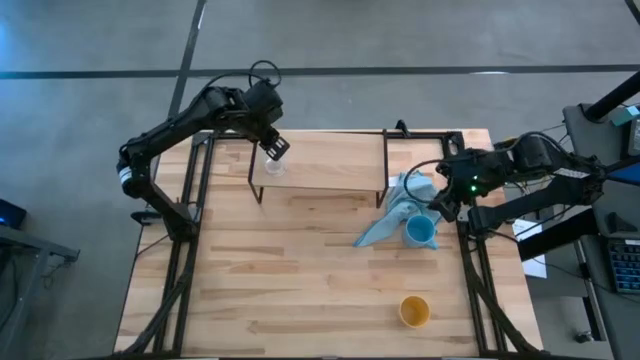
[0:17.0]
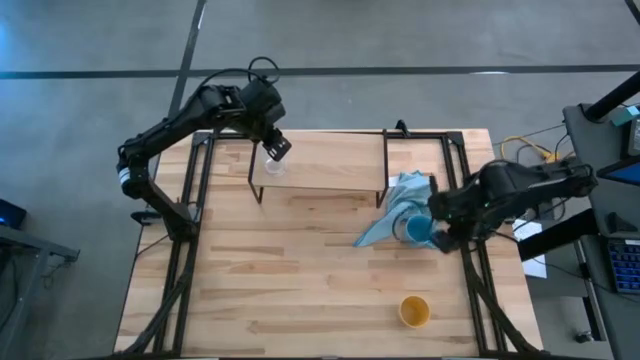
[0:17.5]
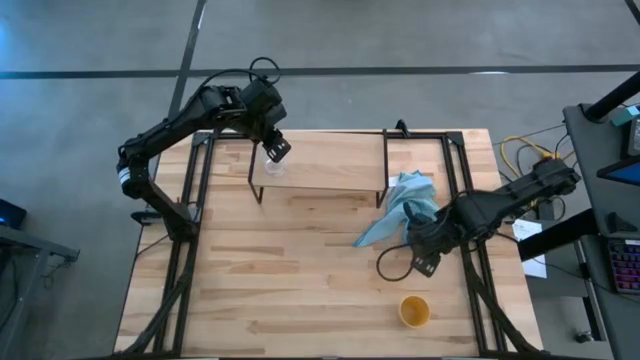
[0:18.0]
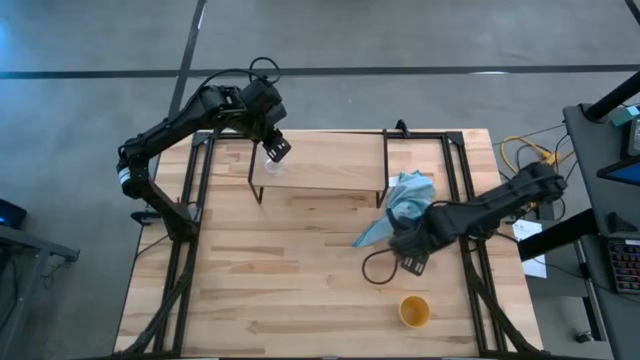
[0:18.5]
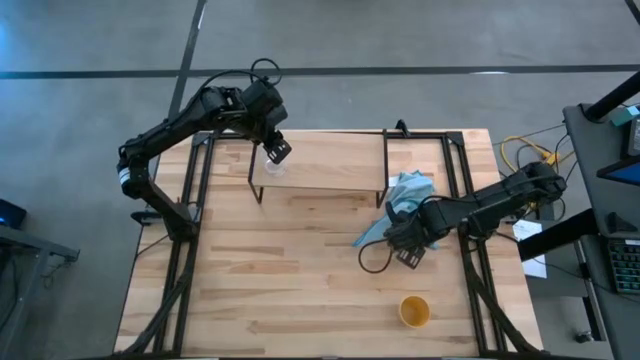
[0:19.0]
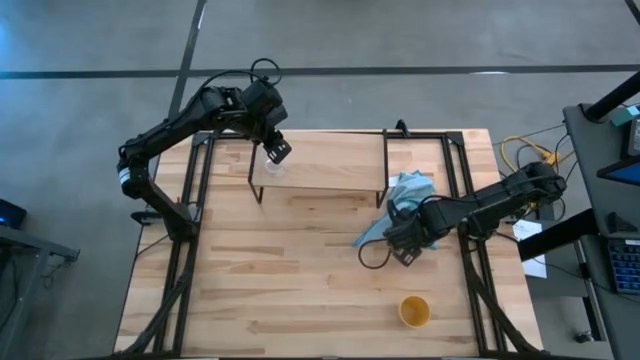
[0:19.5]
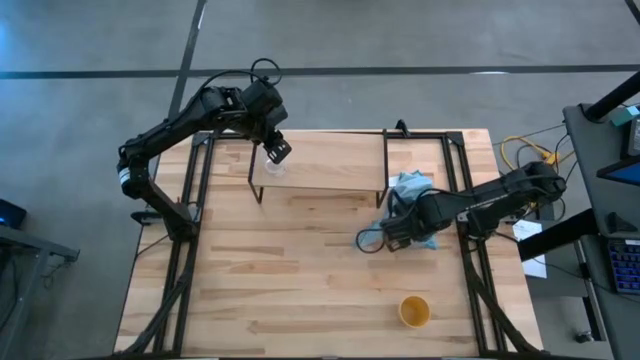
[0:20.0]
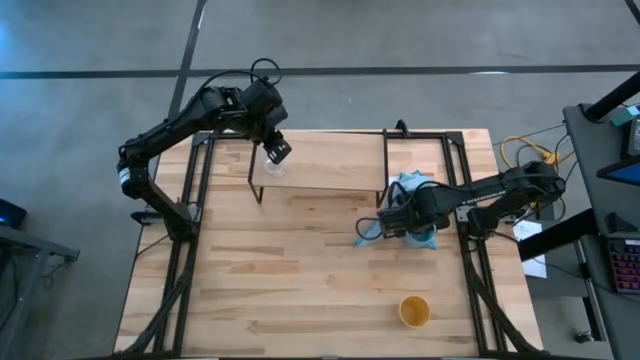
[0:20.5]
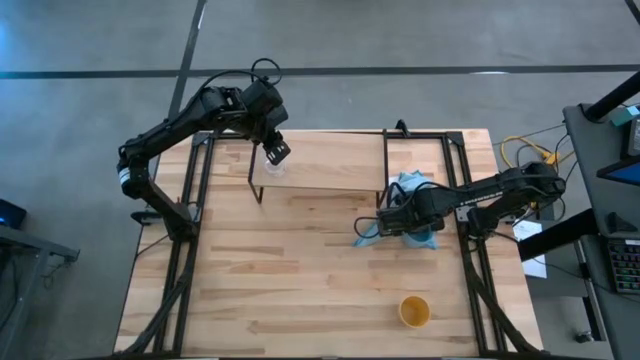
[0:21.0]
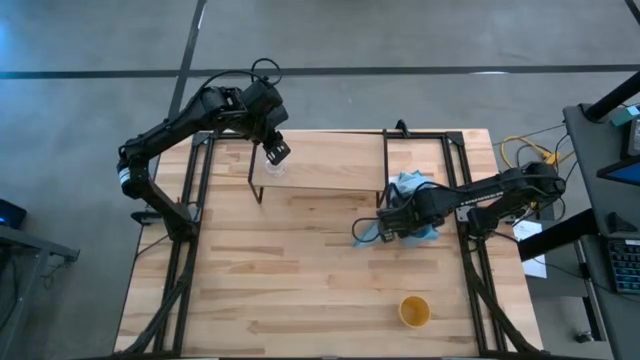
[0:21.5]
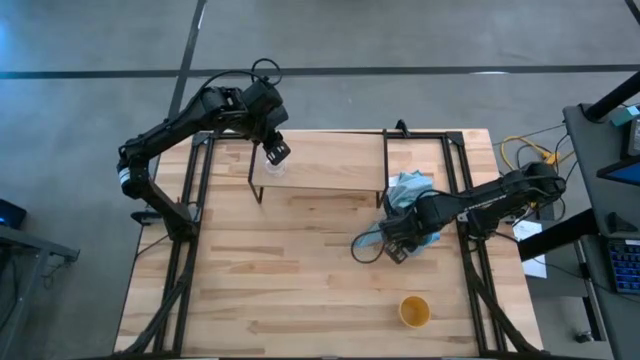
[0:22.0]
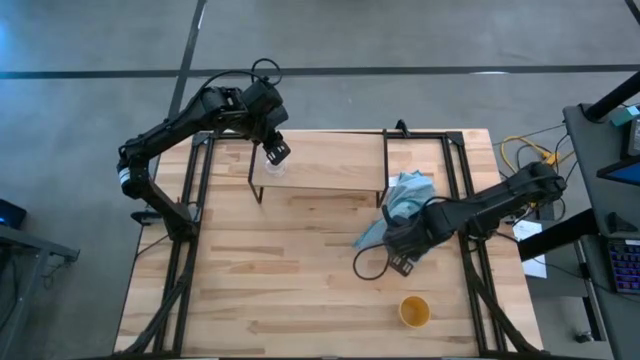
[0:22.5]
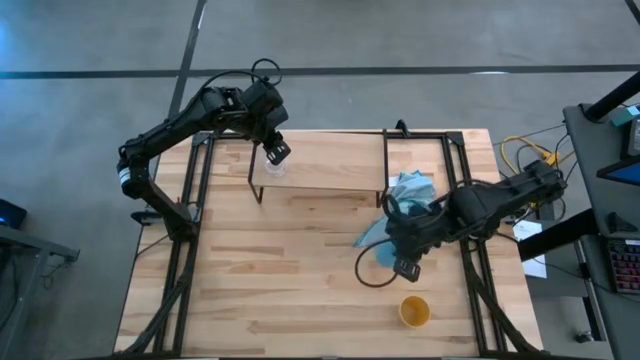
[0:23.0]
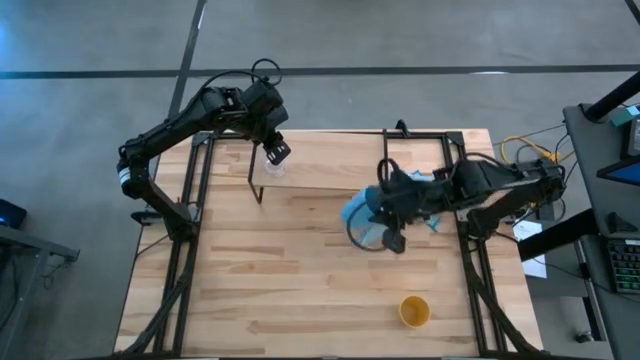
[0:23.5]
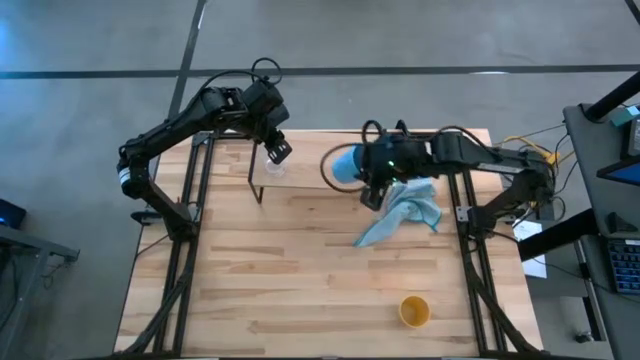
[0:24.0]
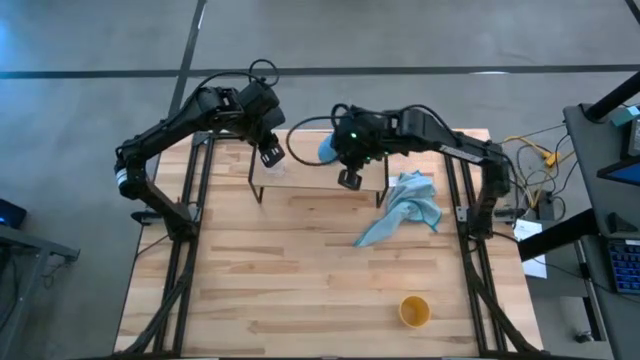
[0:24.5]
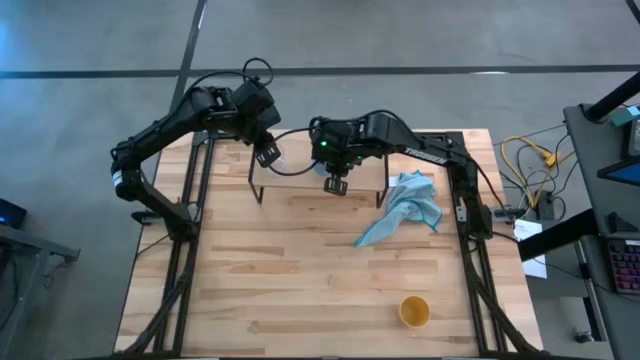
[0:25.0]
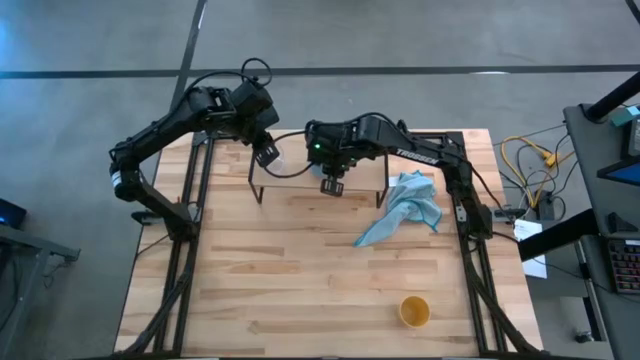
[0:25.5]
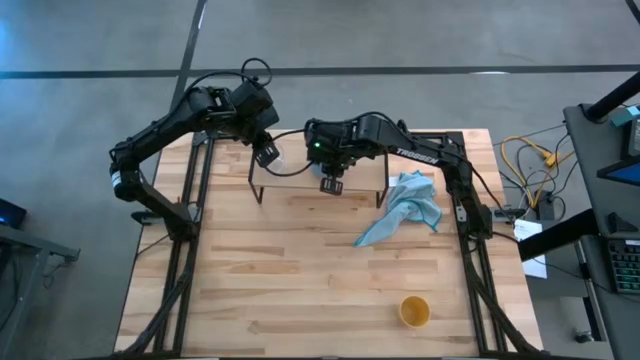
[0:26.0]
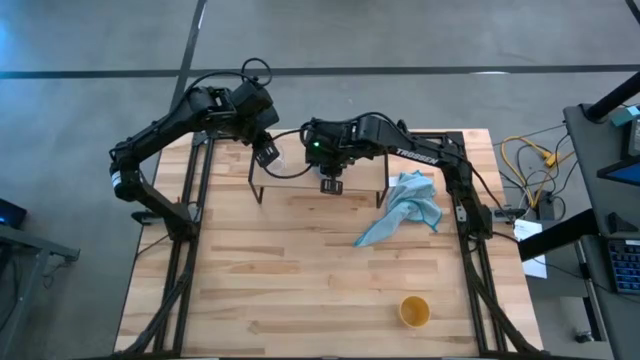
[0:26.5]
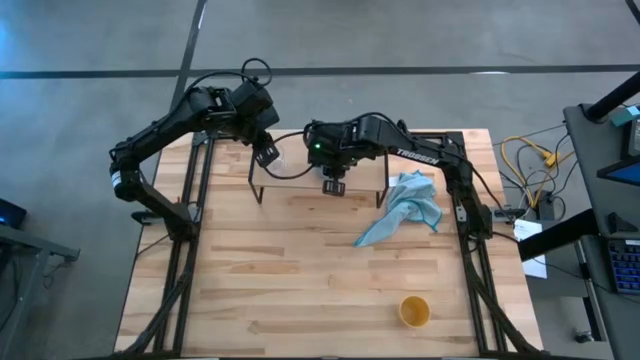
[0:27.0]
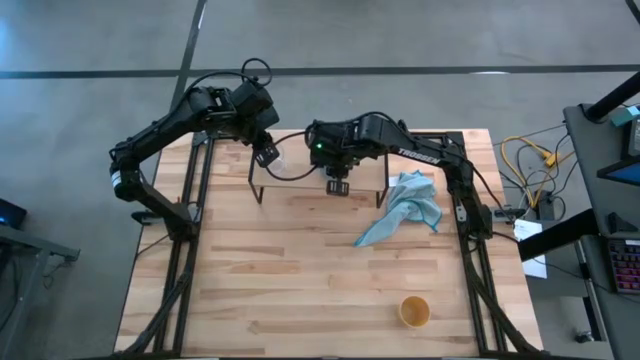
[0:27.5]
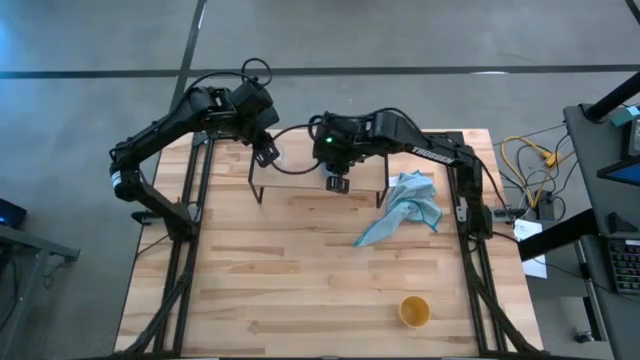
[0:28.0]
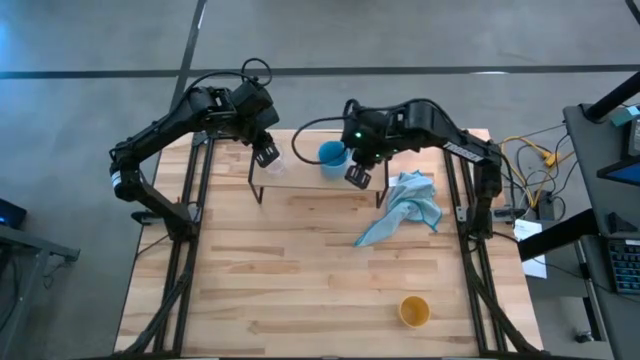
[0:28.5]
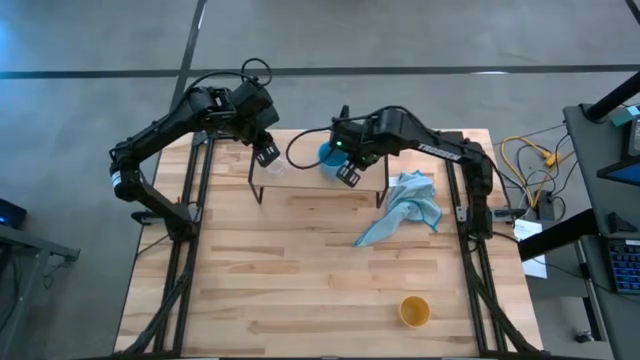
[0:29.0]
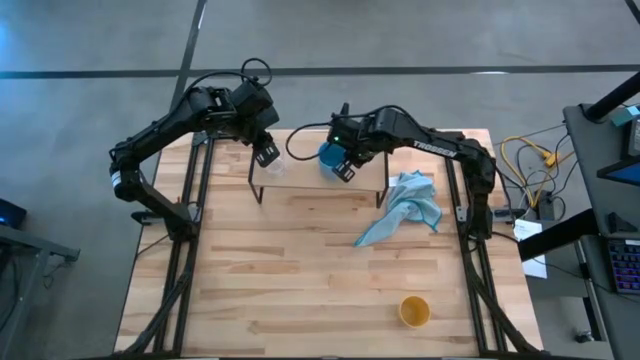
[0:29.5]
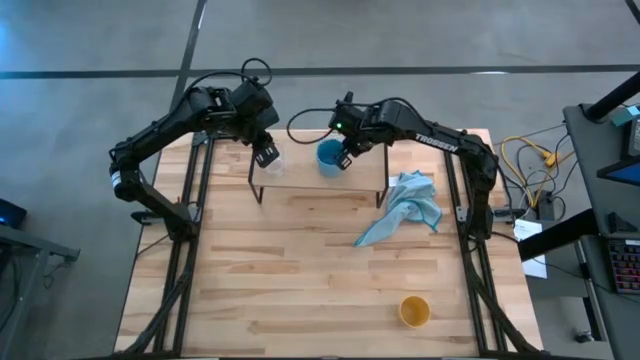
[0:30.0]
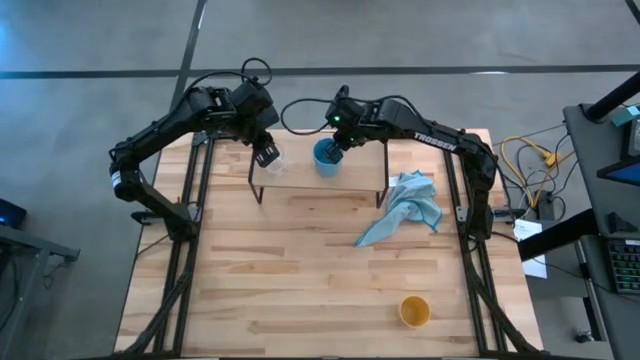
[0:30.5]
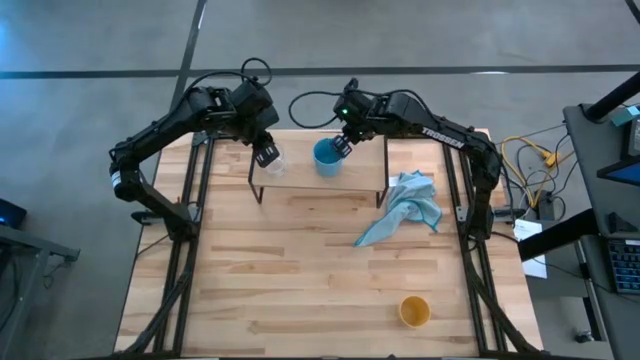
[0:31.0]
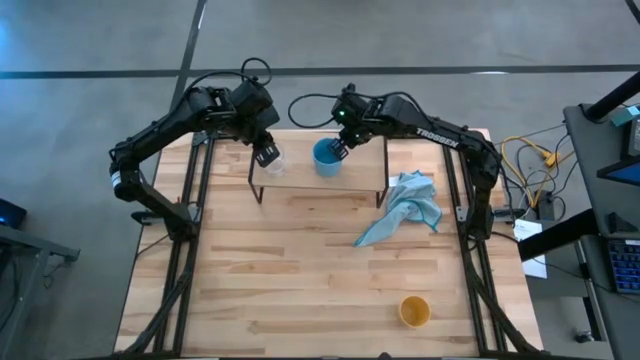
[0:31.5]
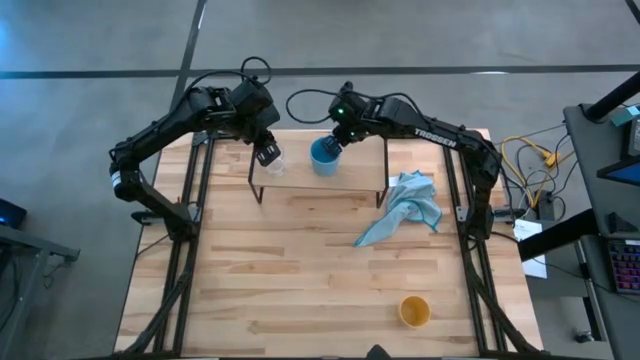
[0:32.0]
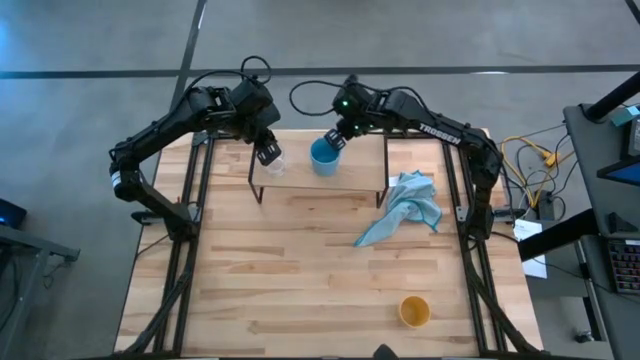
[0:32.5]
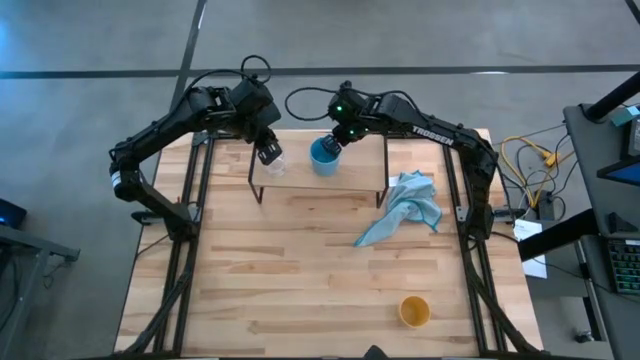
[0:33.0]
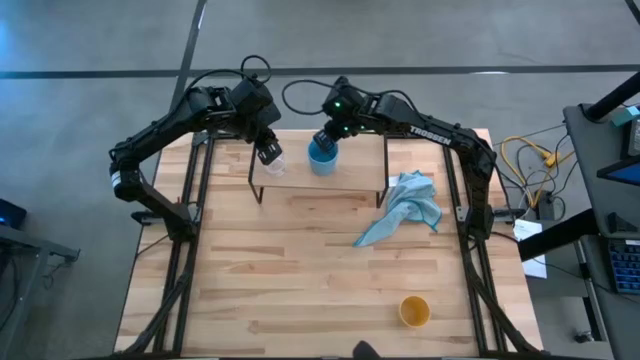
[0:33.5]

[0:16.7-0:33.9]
Task: Stack small to large cups/mugs on shelf
Put the blue mug on the shelf

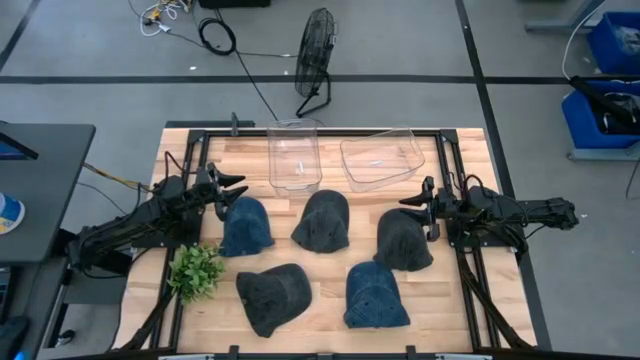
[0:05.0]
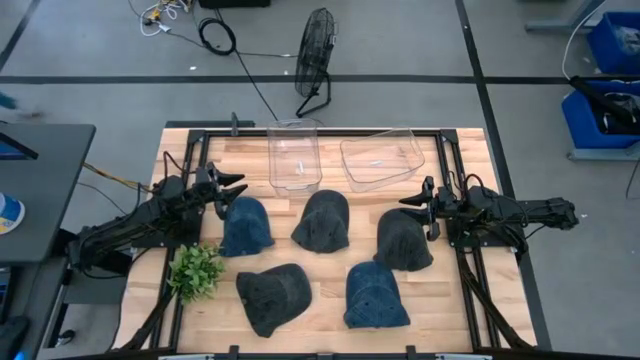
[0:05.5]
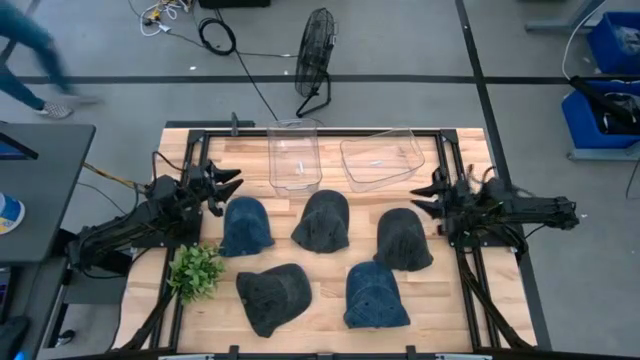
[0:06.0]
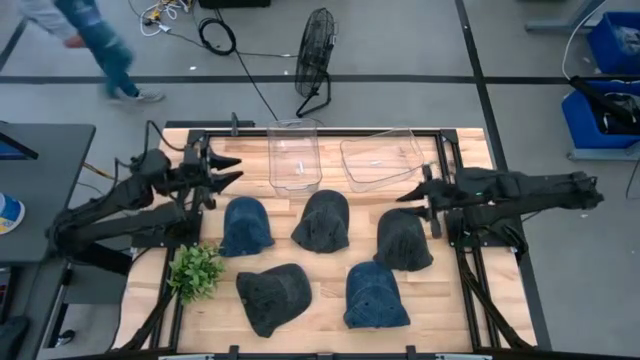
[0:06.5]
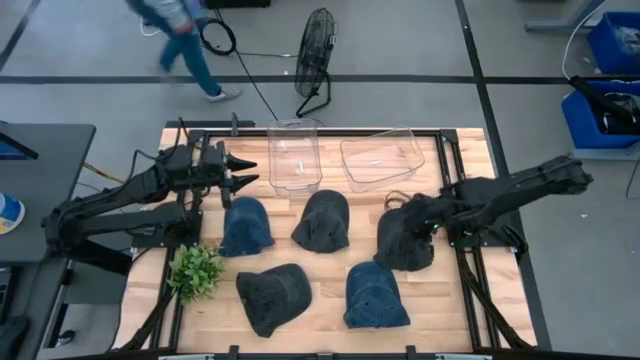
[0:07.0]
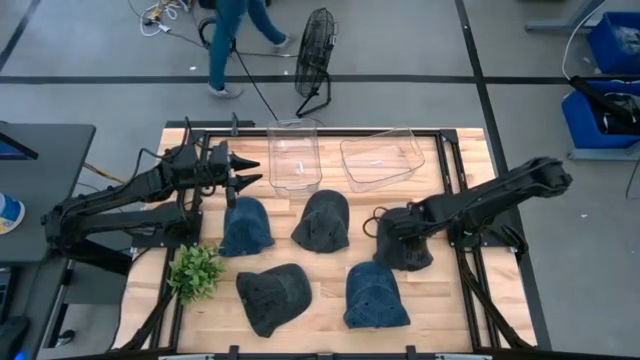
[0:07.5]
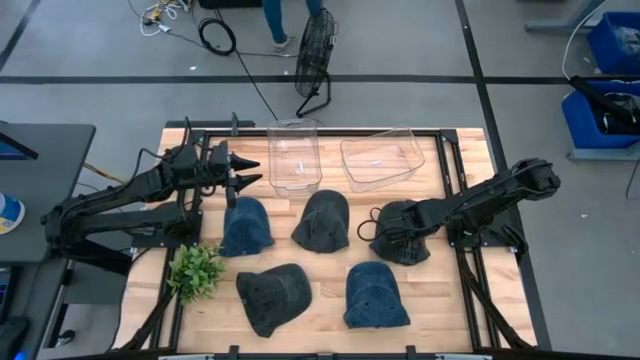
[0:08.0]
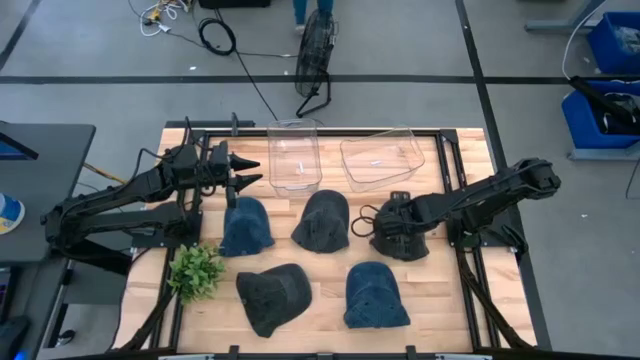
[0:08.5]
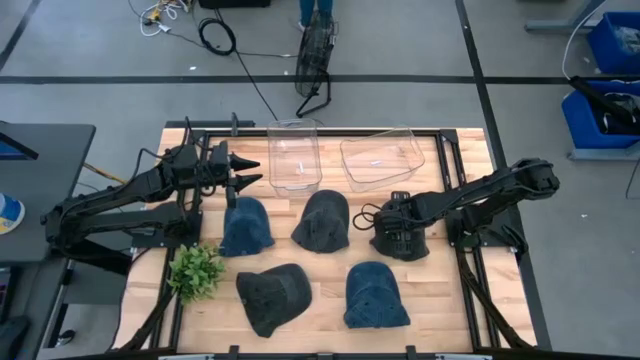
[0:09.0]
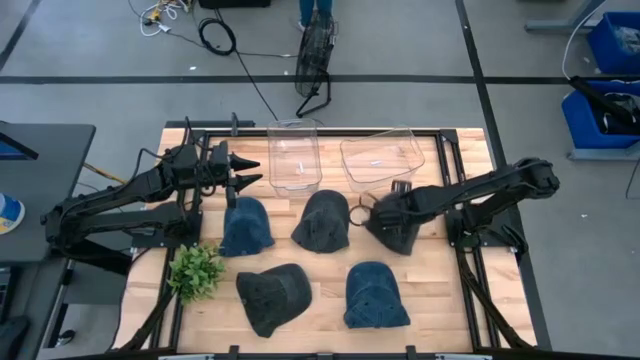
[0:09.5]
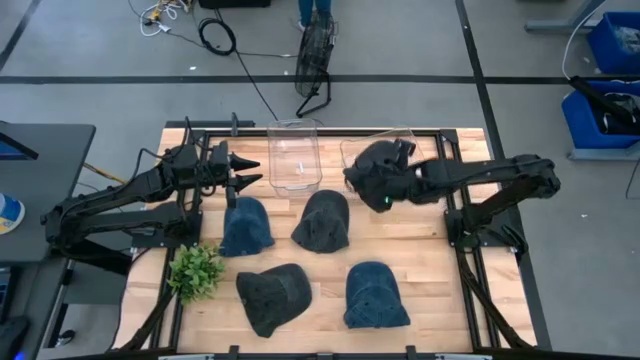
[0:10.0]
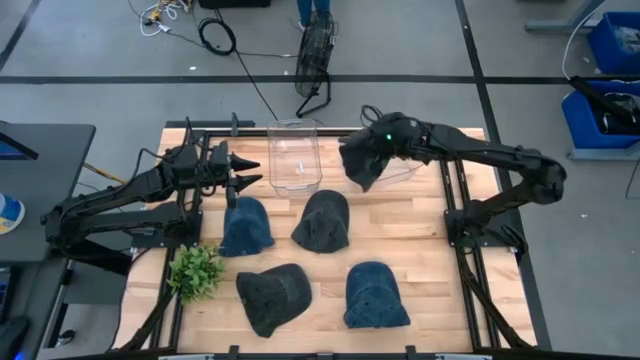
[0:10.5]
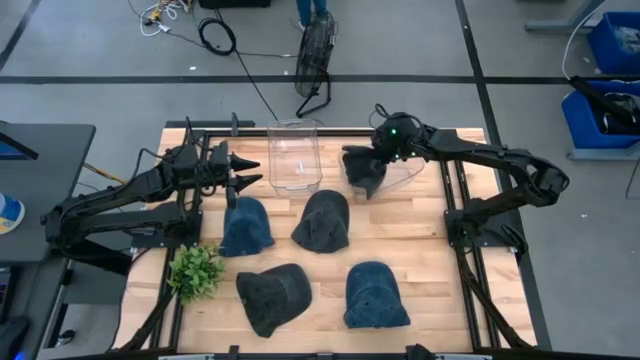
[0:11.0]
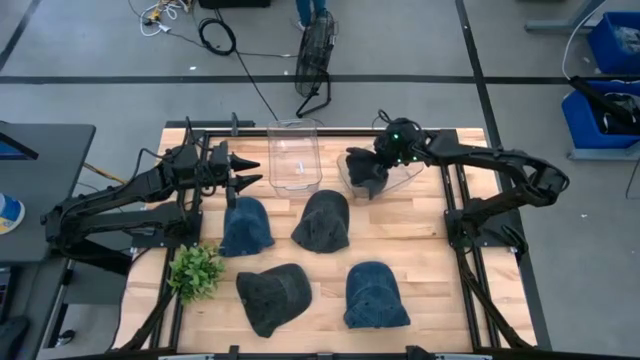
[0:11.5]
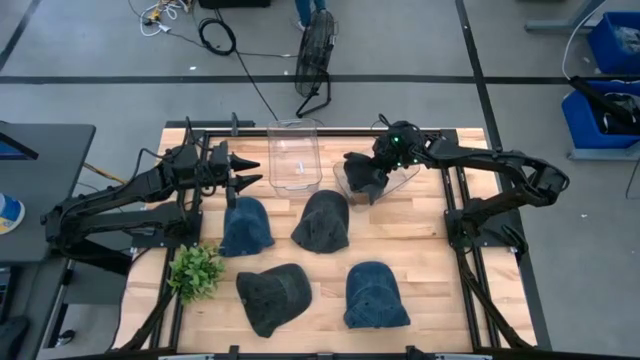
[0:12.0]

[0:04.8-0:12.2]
Task: Pick & Place hat
Put the top right black cap into the right transparent bin
